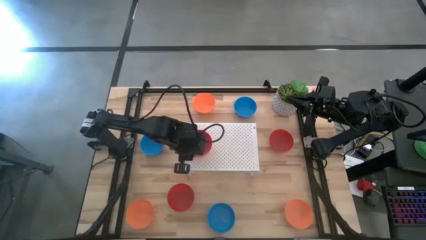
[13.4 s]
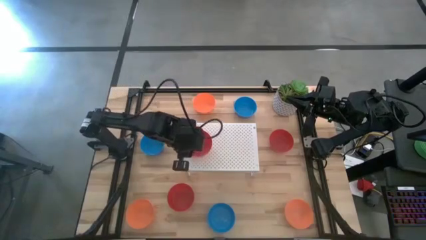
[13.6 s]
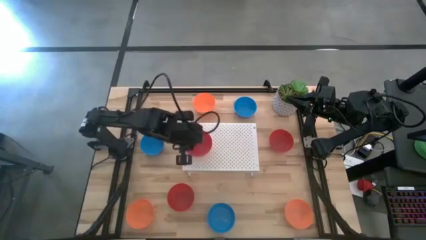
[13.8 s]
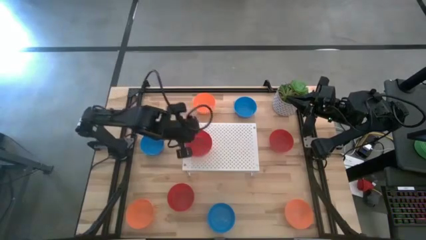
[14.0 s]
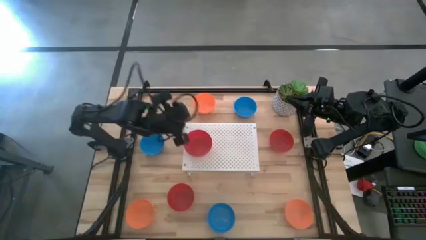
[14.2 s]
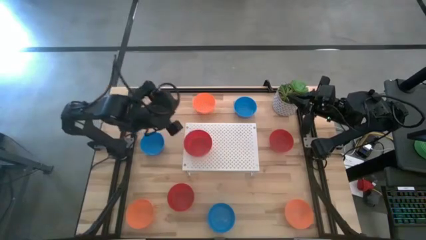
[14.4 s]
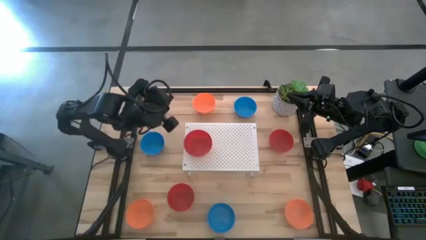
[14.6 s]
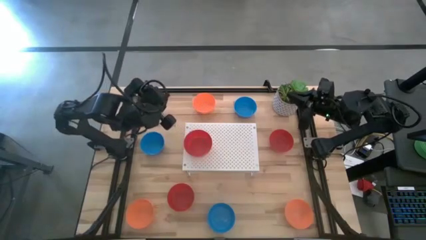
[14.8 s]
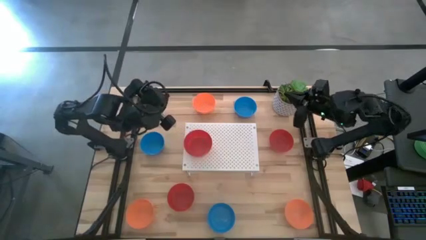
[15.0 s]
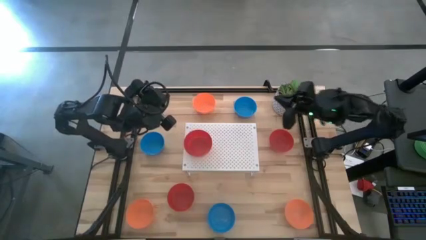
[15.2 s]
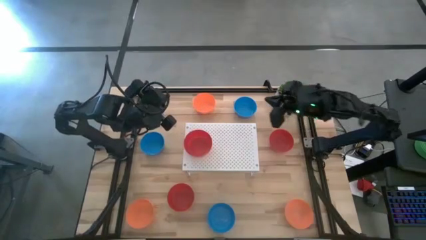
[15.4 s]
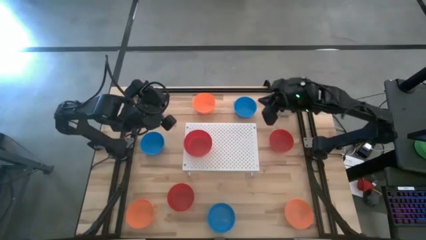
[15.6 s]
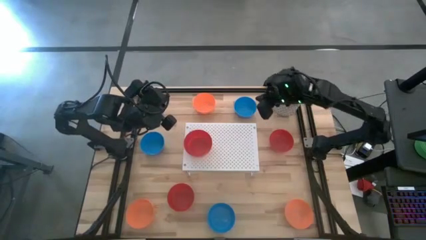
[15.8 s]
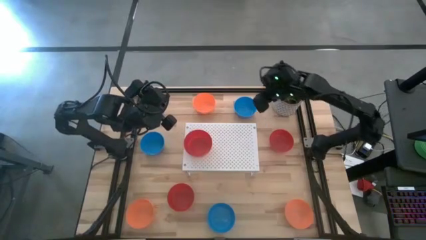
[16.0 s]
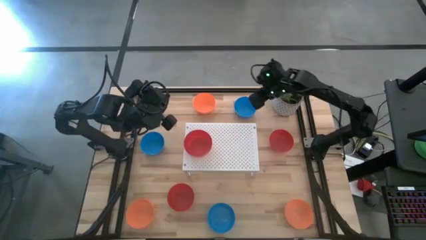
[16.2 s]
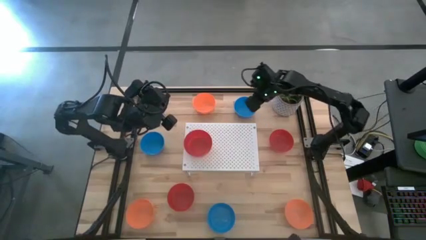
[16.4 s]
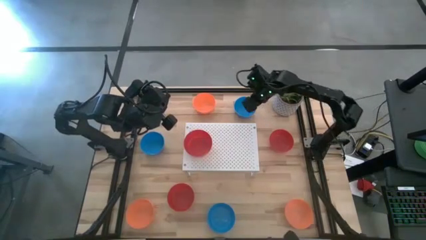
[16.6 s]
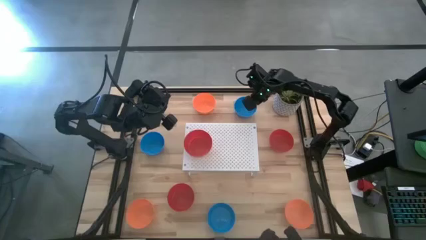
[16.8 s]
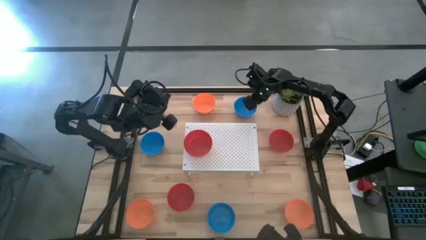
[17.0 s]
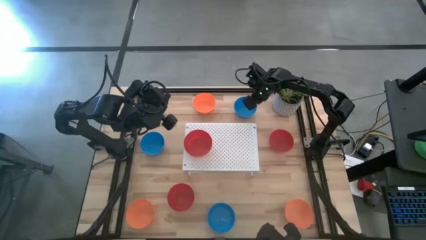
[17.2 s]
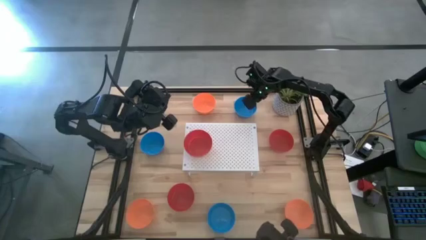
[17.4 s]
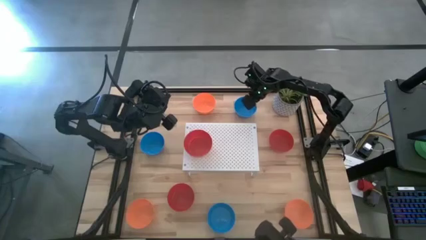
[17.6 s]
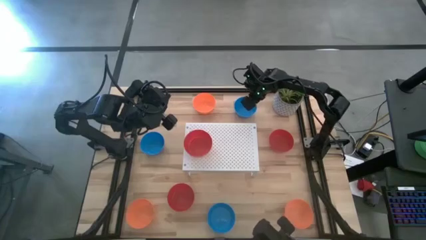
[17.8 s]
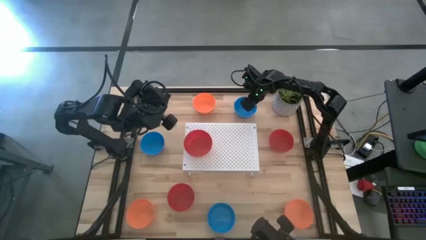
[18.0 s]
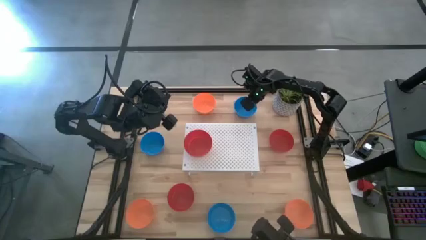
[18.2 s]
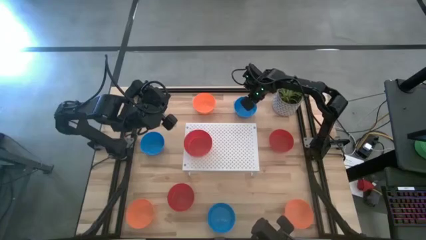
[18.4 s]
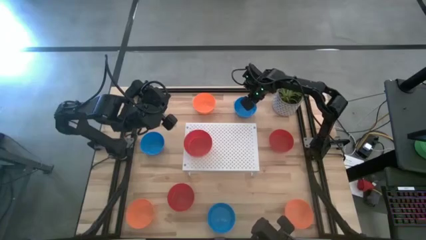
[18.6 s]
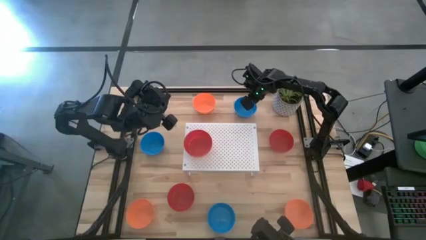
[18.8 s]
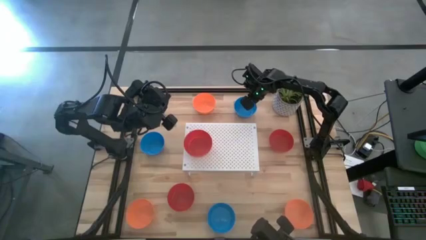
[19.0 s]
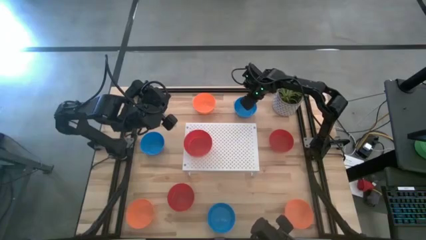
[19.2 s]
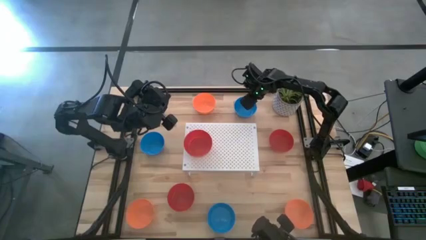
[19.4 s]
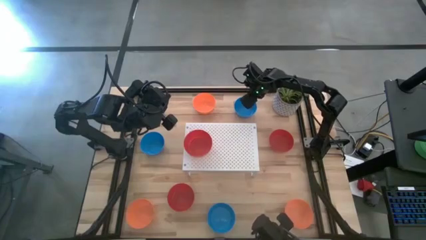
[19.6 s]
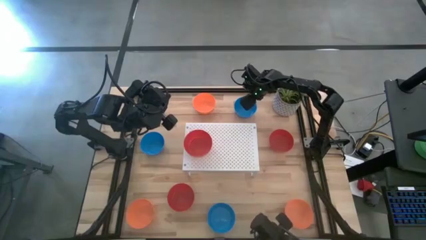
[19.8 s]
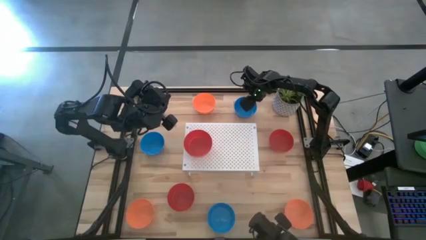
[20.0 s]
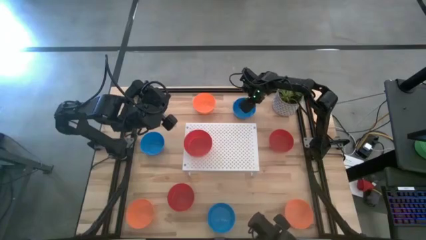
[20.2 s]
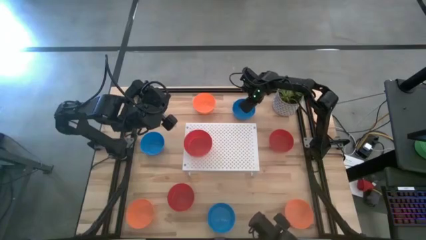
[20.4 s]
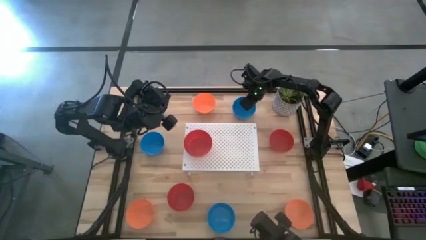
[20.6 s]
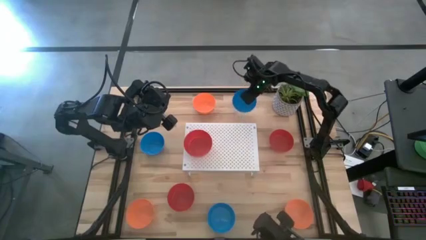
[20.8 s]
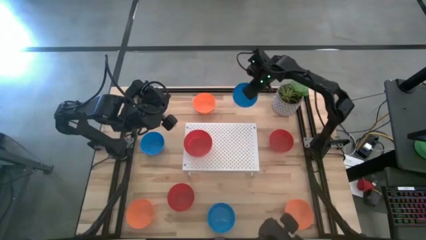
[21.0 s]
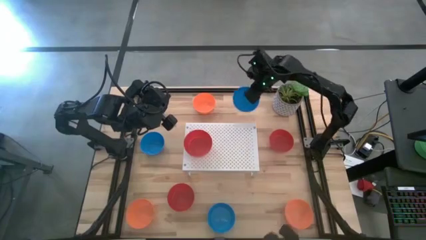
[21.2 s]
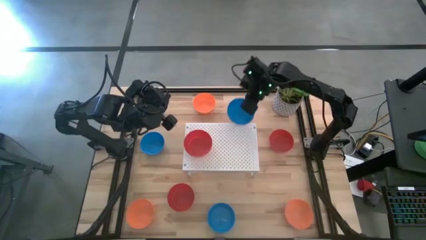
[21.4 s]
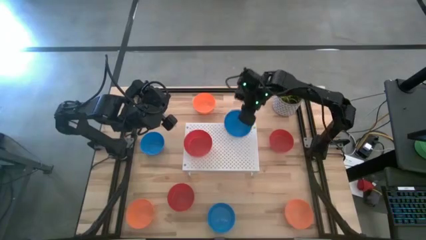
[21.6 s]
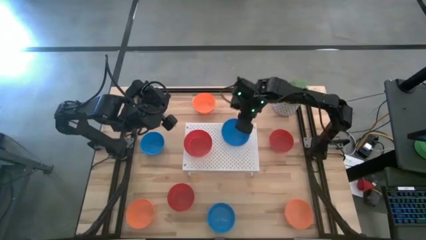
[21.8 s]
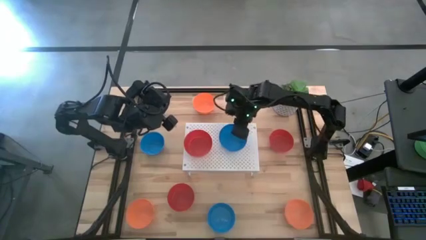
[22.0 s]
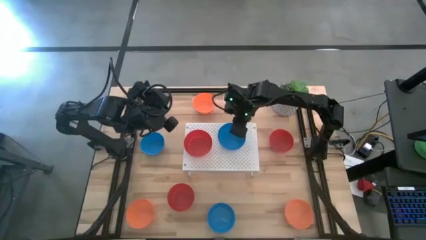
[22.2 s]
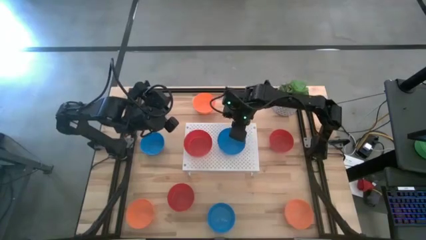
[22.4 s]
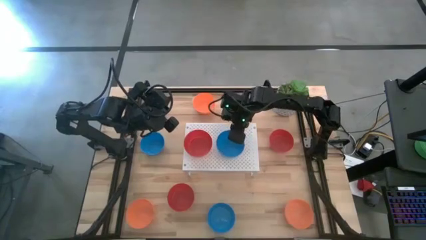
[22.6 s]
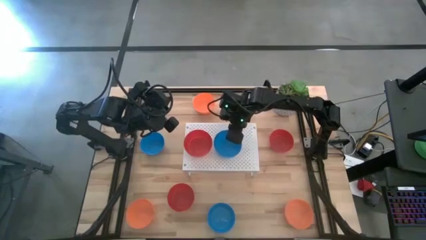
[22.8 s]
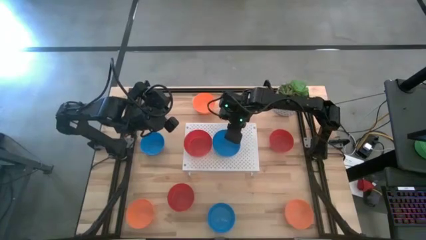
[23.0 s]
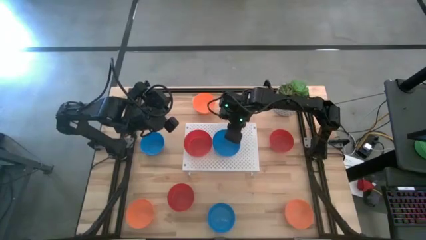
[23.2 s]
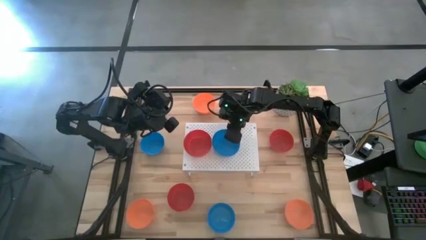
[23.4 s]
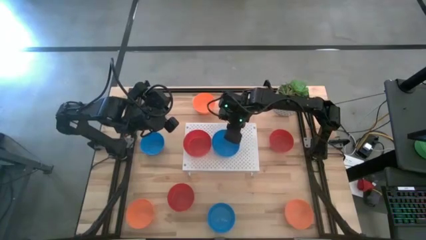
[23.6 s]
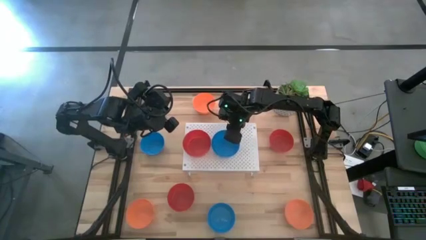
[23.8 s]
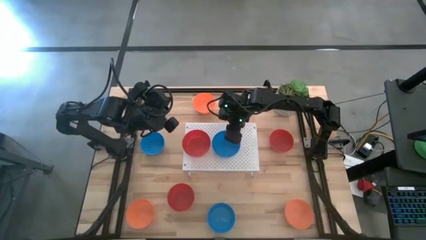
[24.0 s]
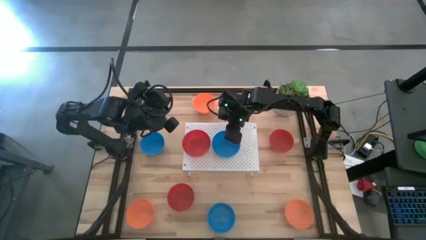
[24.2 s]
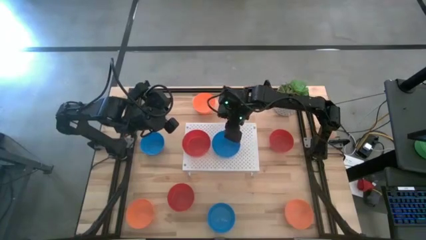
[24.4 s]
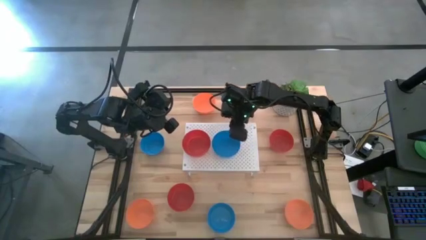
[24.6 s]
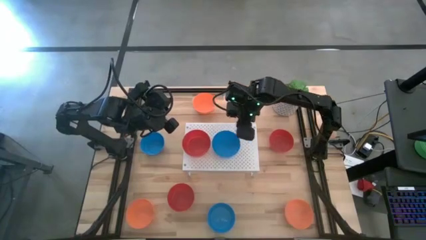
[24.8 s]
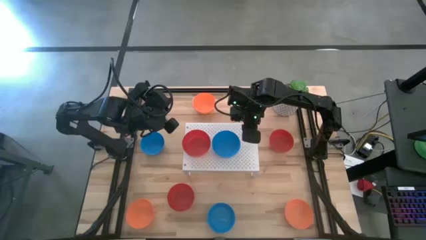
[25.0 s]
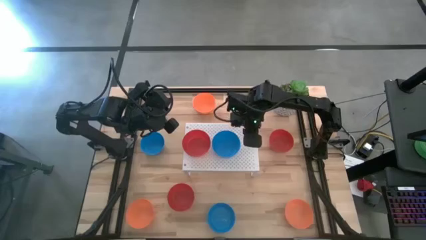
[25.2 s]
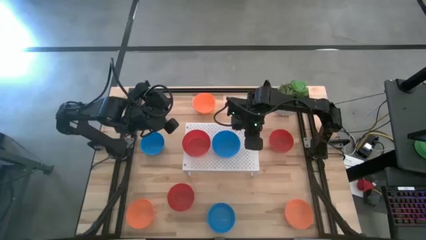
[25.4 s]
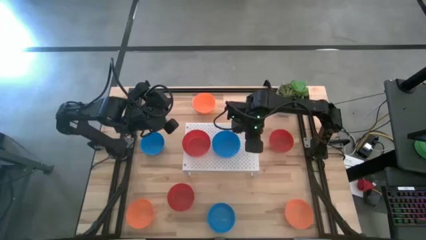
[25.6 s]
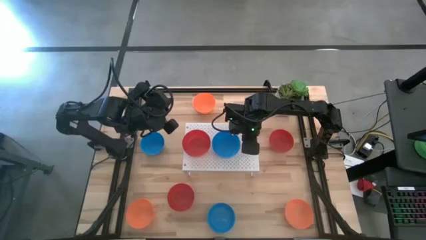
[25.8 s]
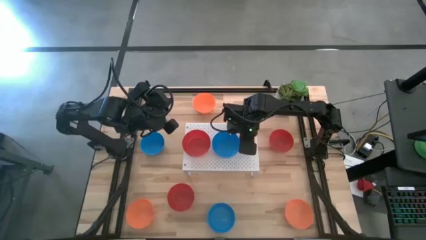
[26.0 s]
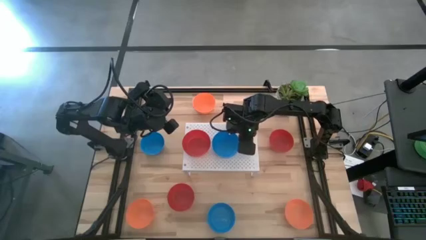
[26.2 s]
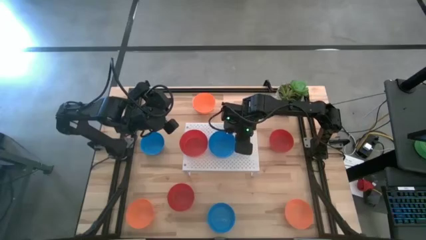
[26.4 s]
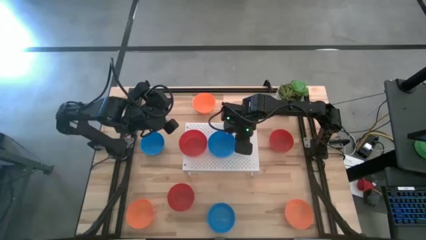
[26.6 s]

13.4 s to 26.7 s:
Task: Pick & Place Mini bowls
Put the top blue bowl on the shelf

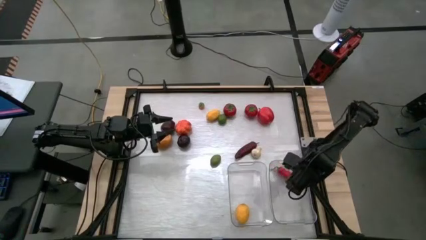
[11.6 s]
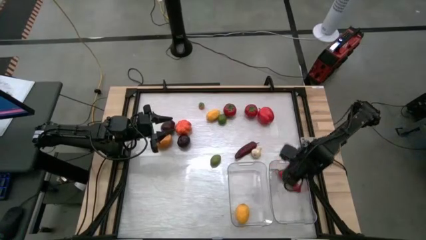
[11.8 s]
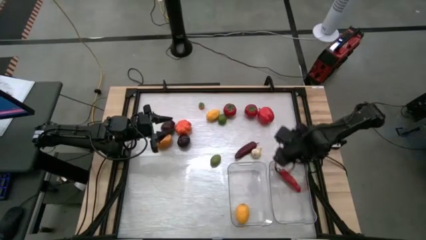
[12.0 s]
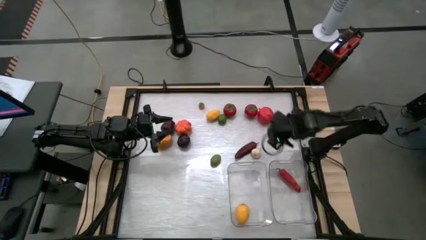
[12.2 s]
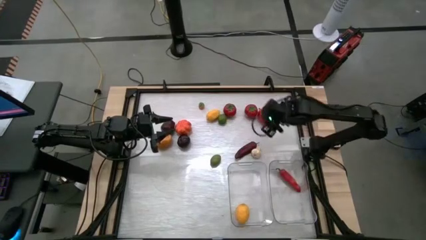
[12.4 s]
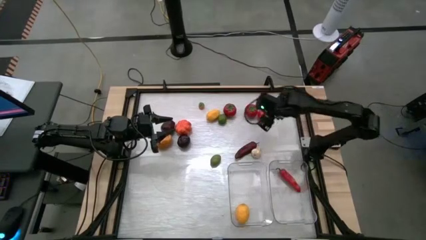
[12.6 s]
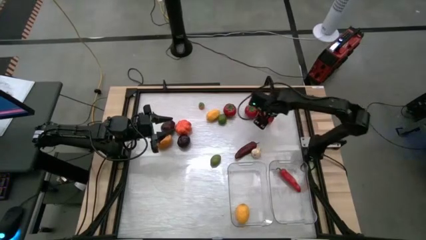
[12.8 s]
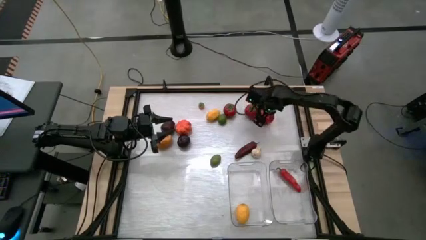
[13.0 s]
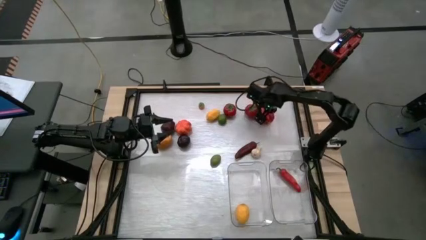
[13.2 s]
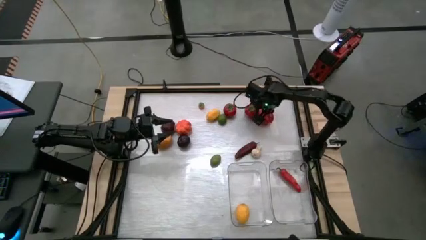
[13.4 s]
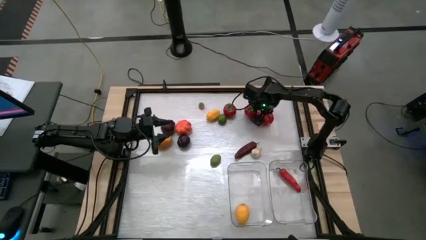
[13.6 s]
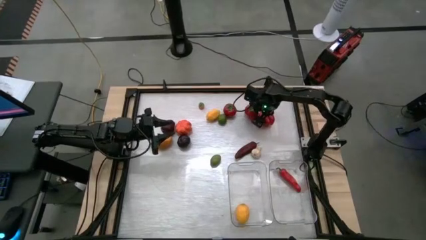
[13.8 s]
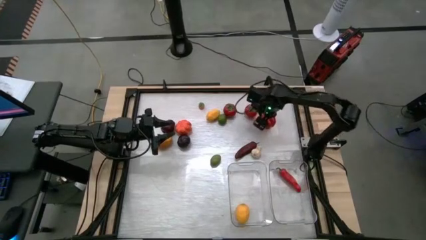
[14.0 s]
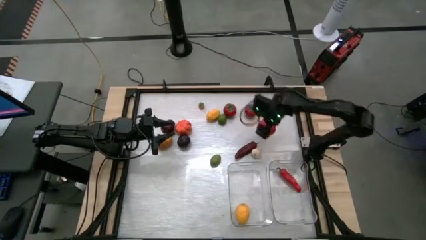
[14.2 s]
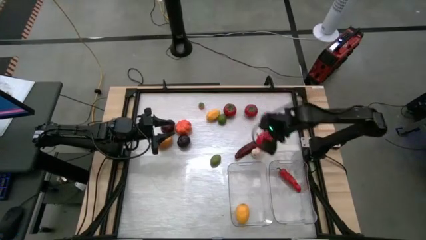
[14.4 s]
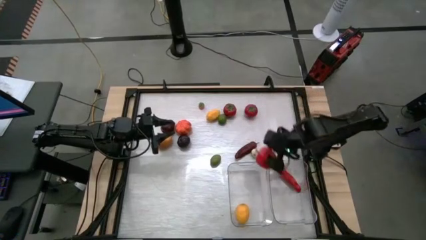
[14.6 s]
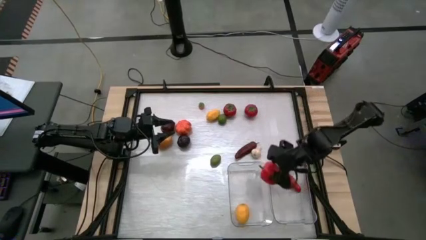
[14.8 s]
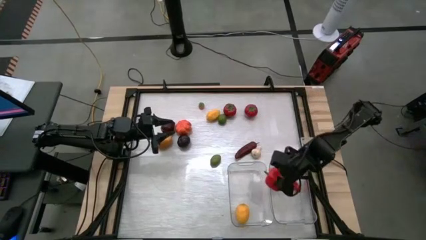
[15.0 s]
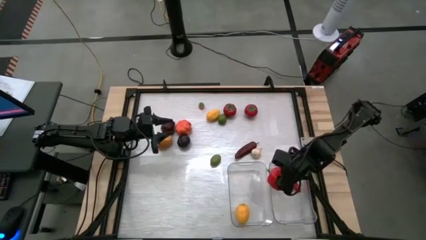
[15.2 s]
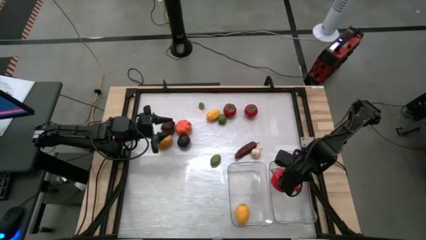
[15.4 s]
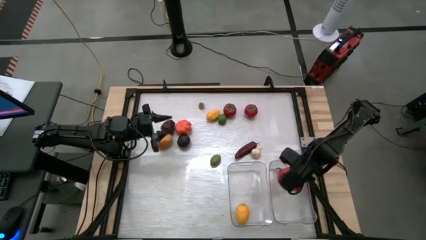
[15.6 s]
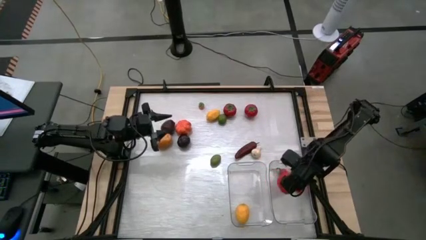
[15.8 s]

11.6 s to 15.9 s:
Task: Sort produce into baskets
Put the red bell pepper into the right transparent bin
